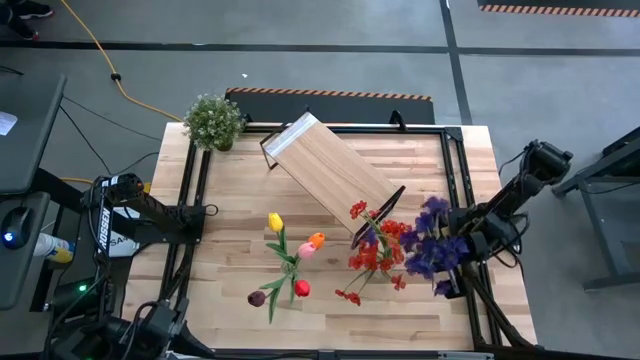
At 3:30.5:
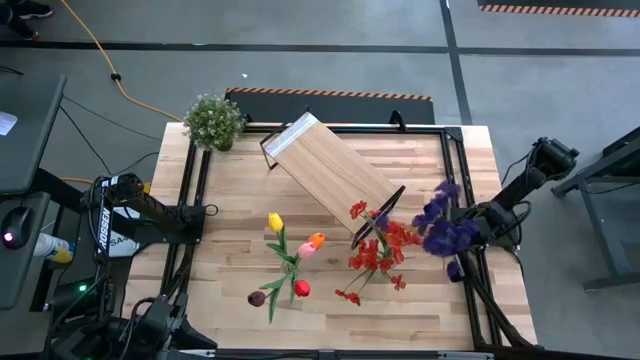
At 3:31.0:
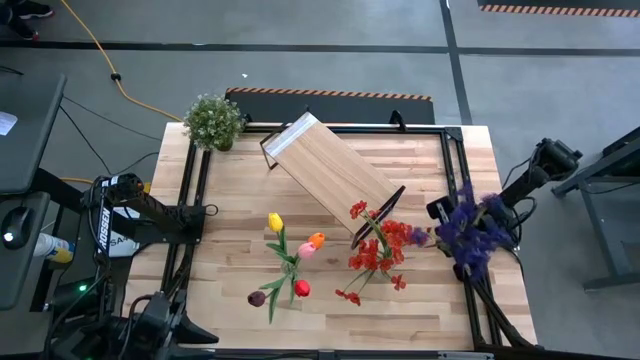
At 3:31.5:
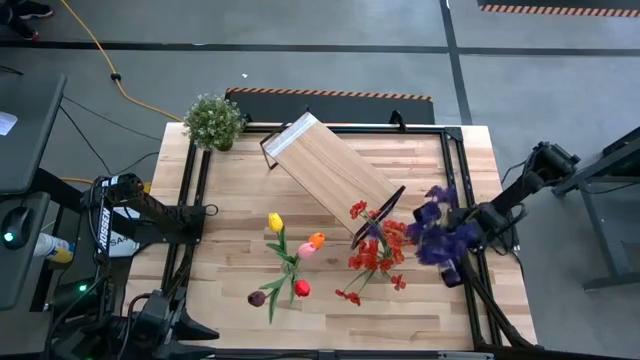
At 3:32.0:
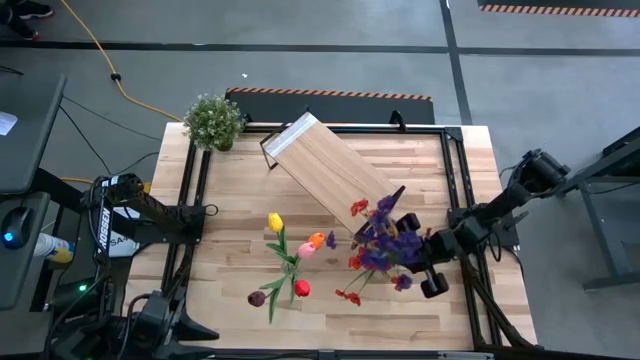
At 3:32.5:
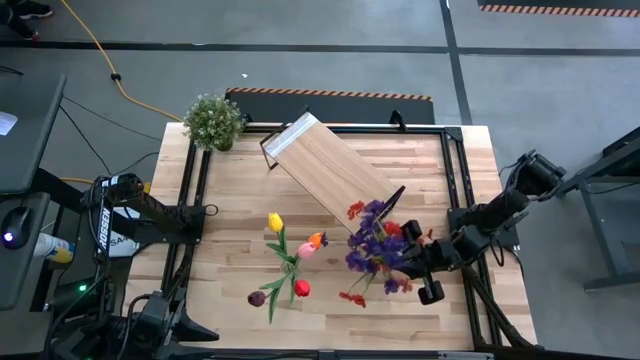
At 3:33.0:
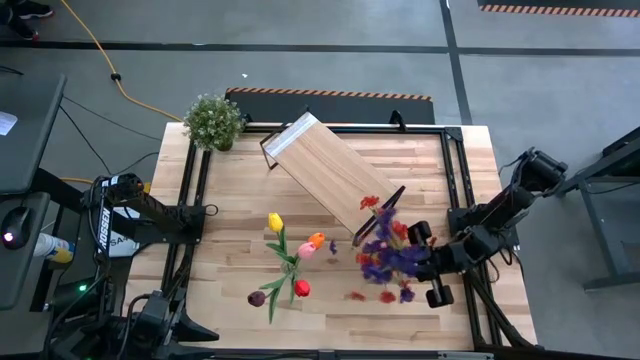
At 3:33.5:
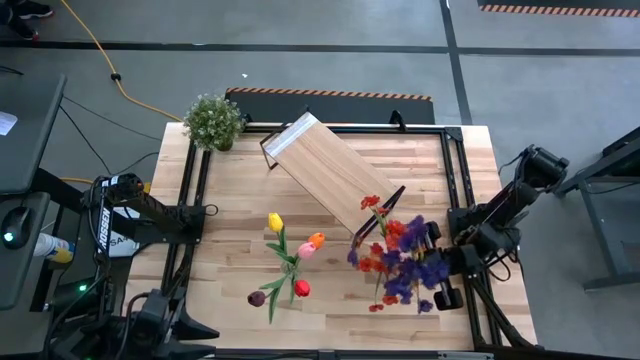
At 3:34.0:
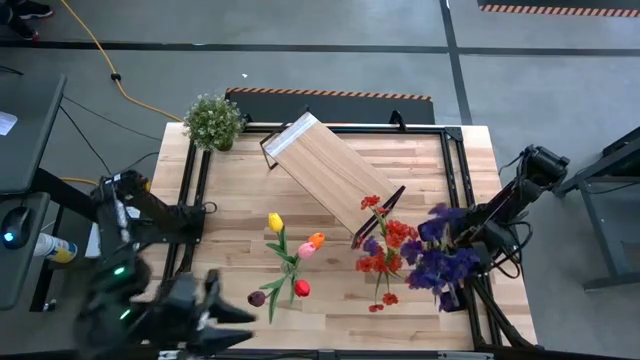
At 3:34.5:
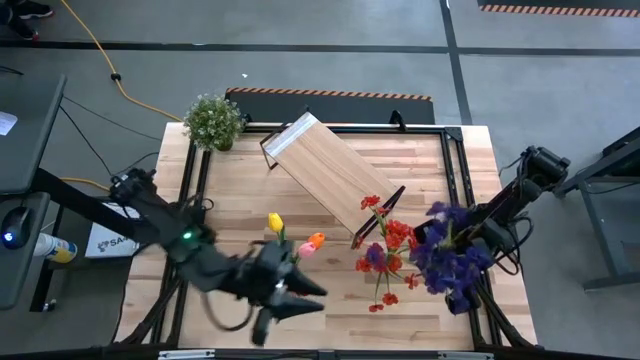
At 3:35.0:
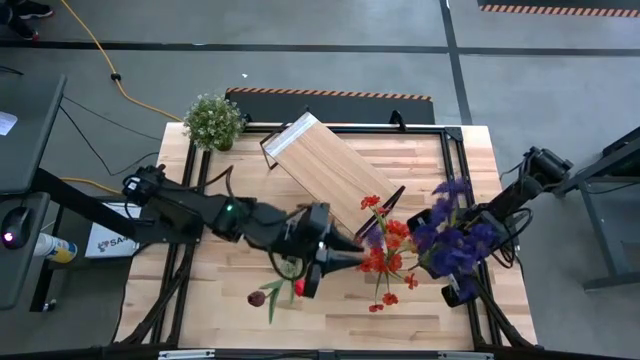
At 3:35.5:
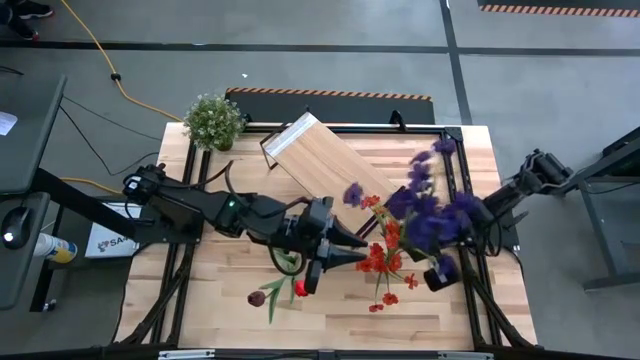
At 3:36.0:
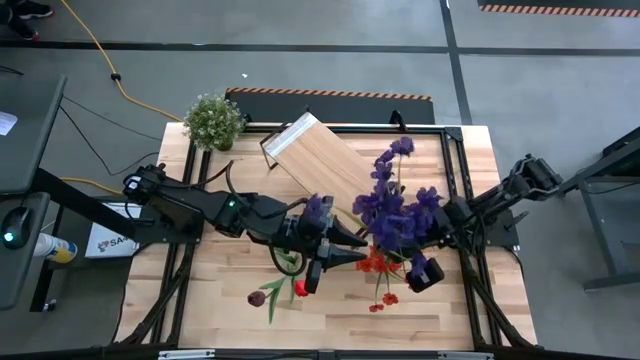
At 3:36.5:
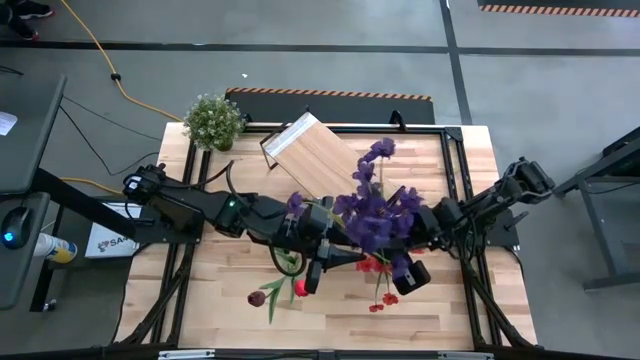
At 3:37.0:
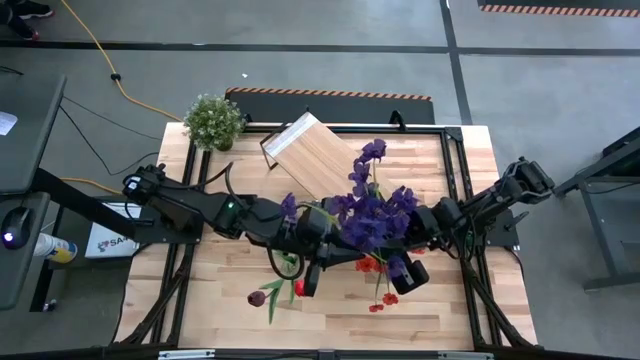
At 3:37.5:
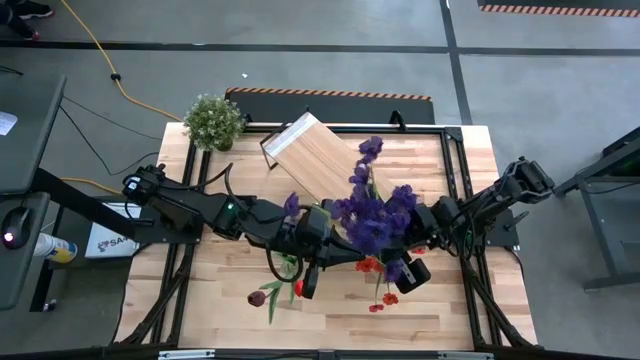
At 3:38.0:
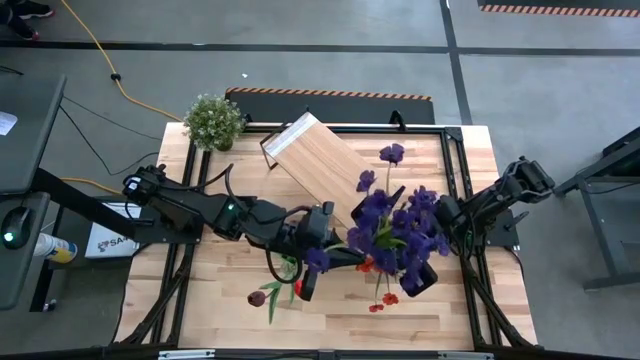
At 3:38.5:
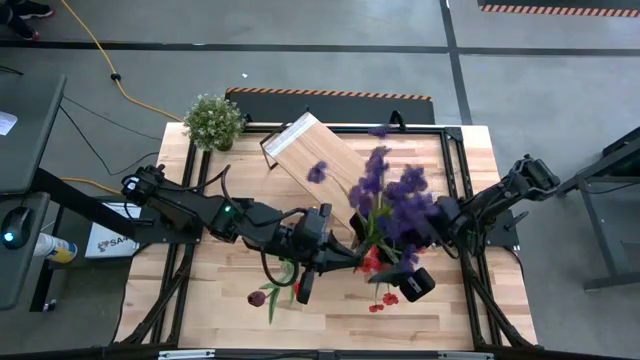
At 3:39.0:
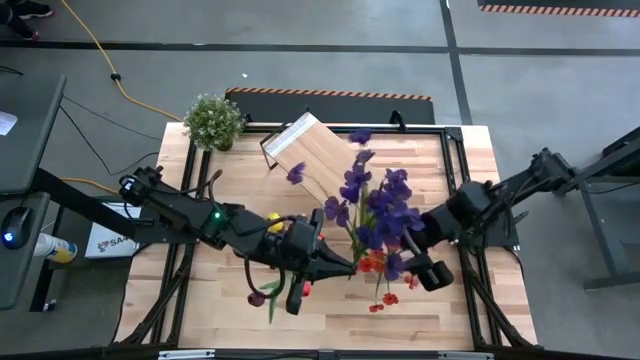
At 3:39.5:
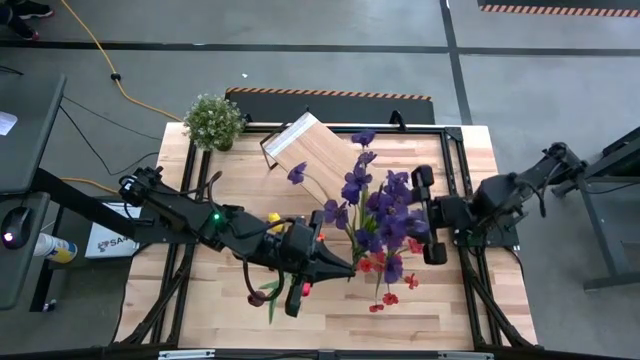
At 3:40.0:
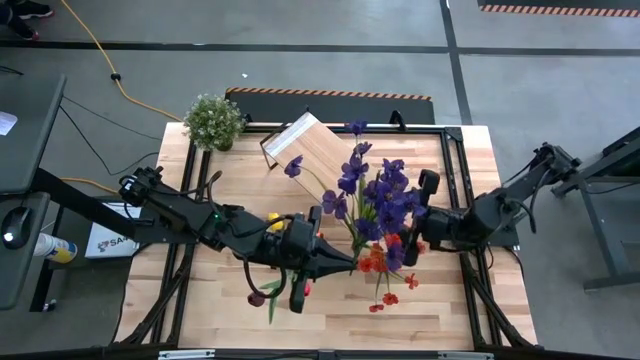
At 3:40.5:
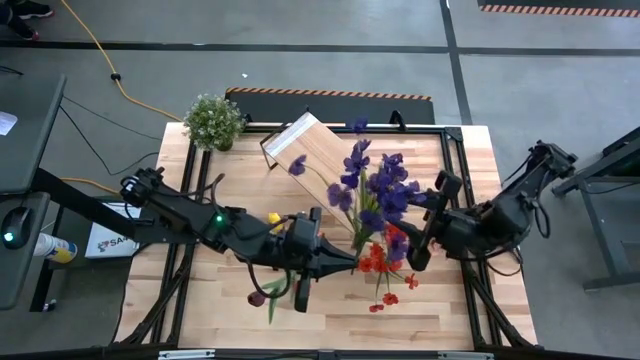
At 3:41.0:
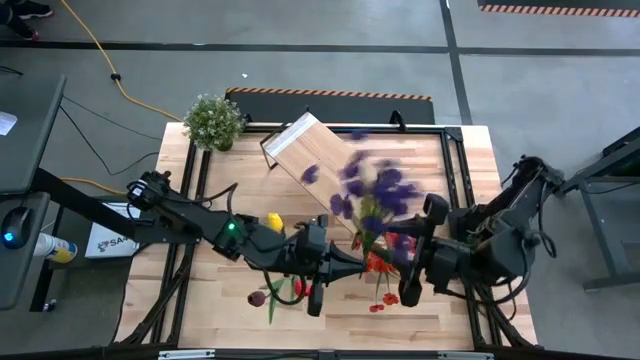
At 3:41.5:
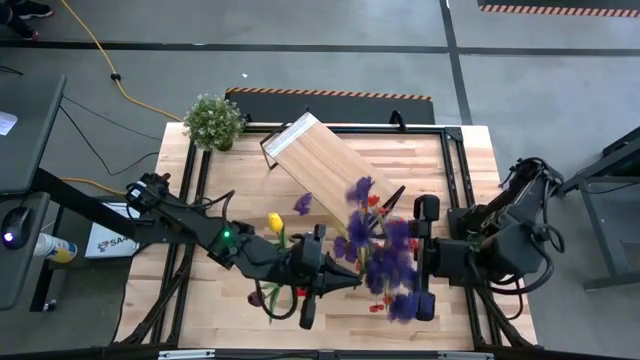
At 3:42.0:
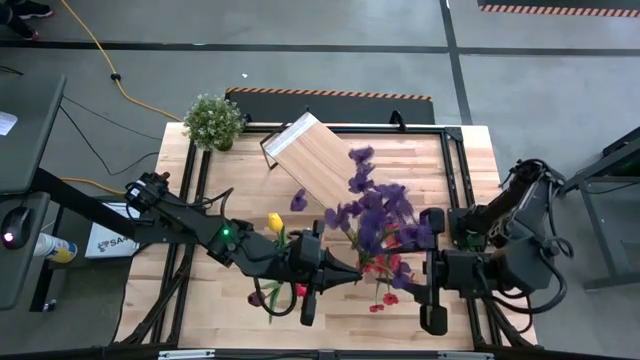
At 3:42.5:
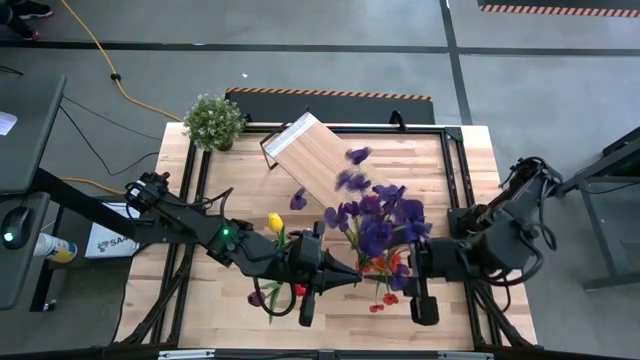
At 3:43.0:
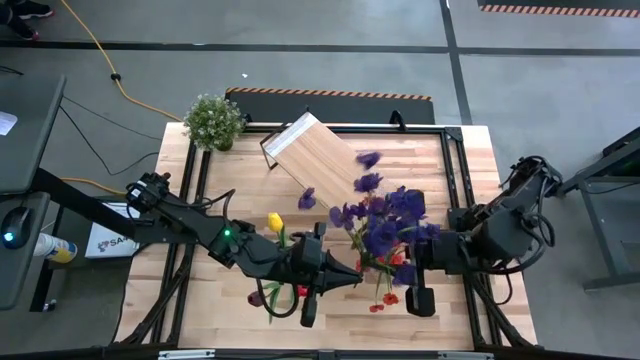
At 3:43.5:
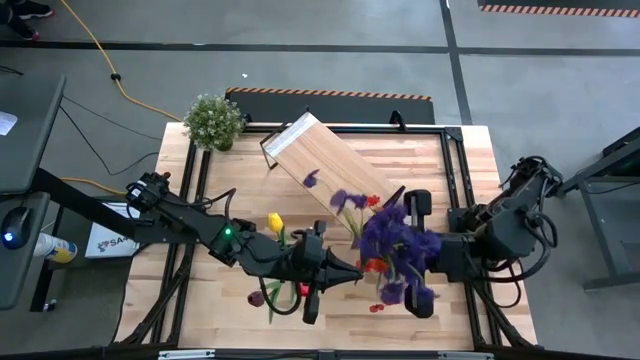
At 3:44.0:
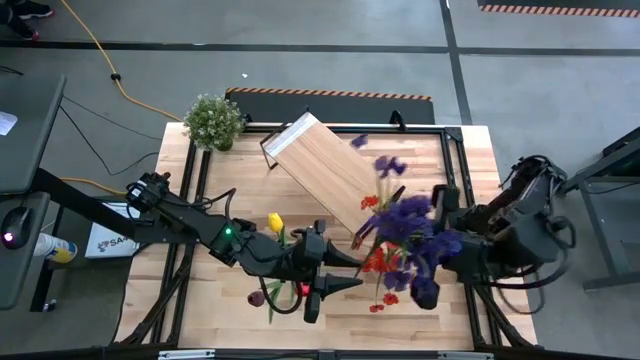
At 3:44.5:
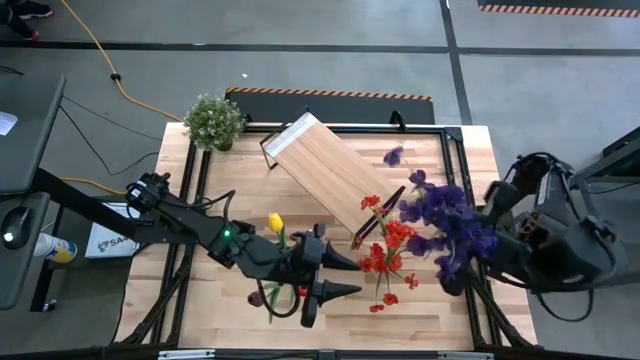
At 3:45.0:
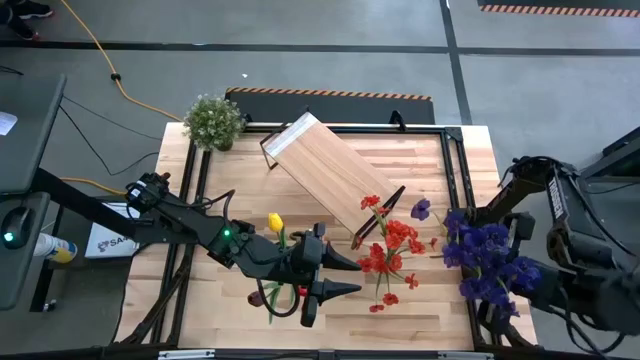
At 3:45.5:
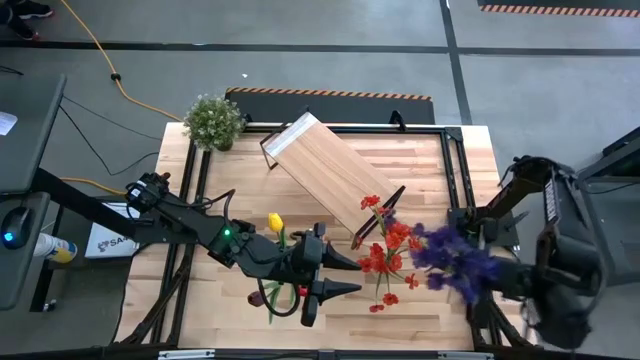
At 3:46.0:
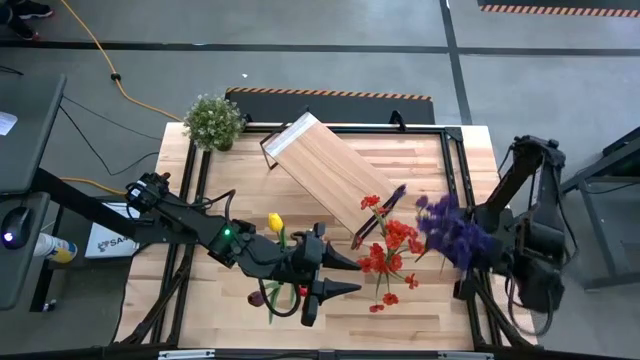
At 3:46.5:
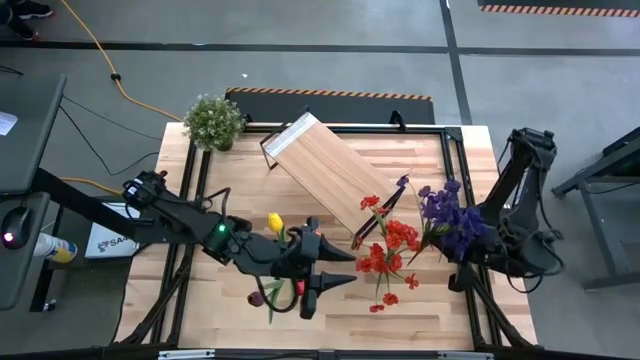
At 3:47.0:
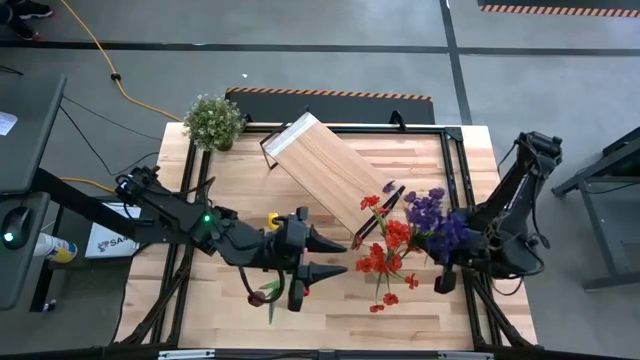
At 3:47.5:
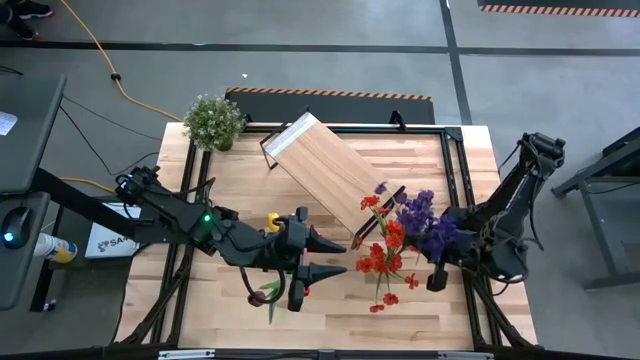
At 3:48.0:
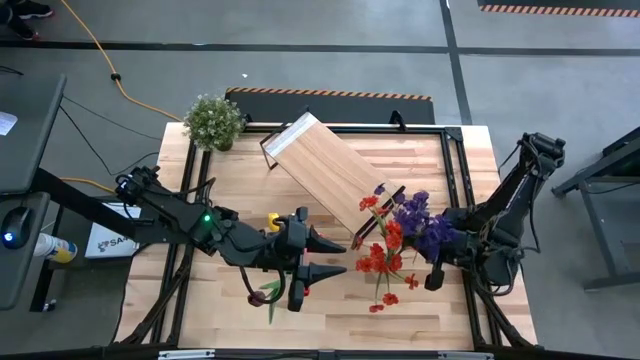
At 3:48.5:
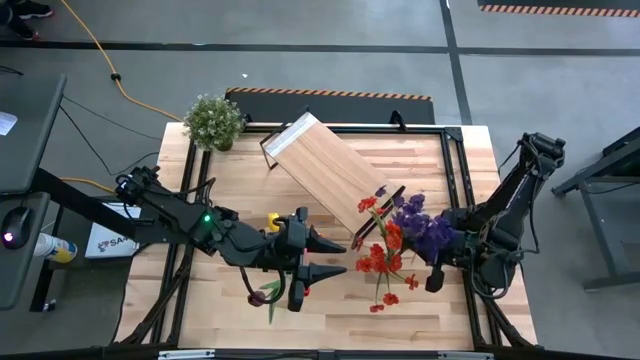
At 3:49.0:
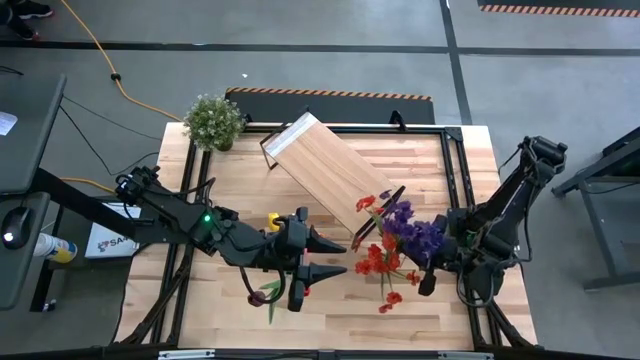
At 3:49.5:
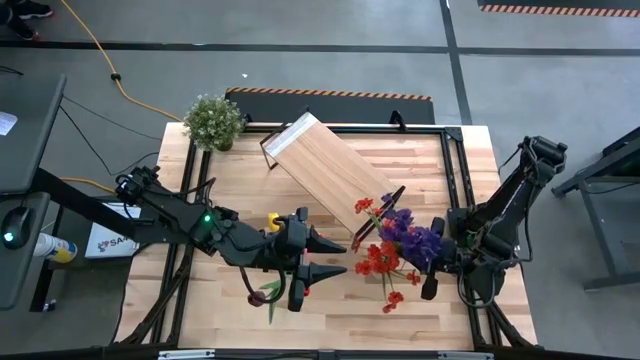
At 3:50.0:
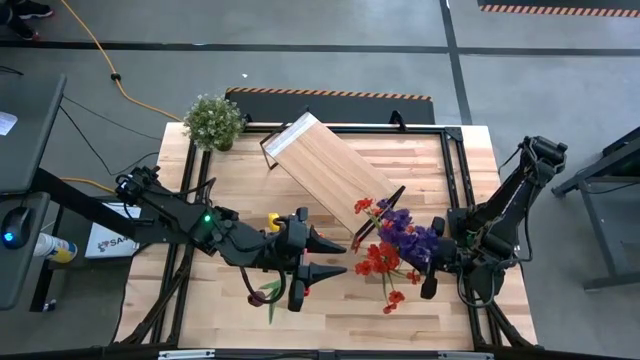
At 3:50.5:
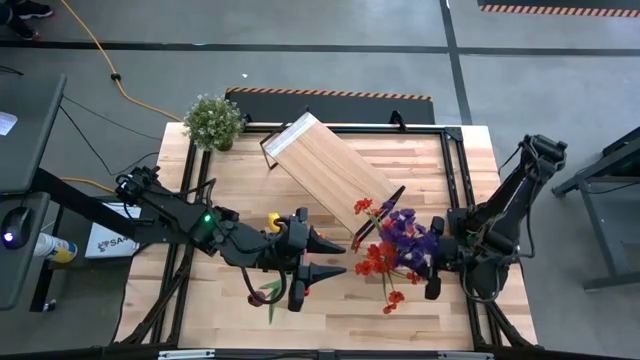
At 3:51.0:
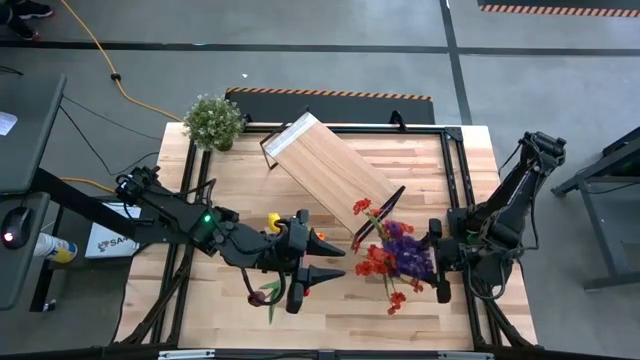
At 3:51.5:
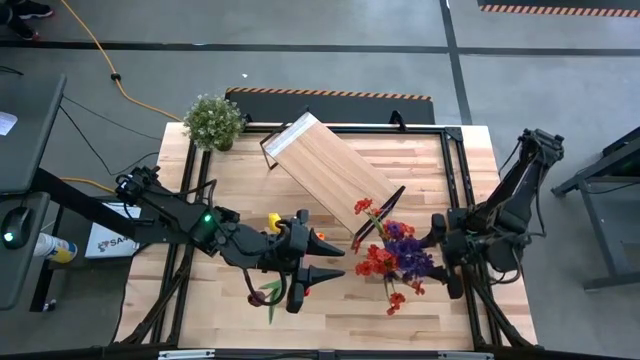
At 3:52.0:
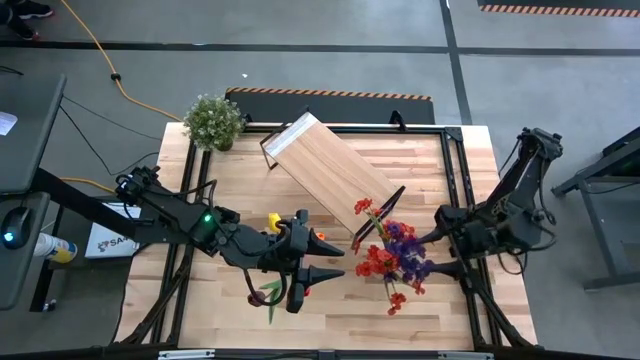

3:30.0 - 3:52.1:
Task: Pick and place flowers into a vace then onto a shelf
Put the blue flowers into the right transparent vase
